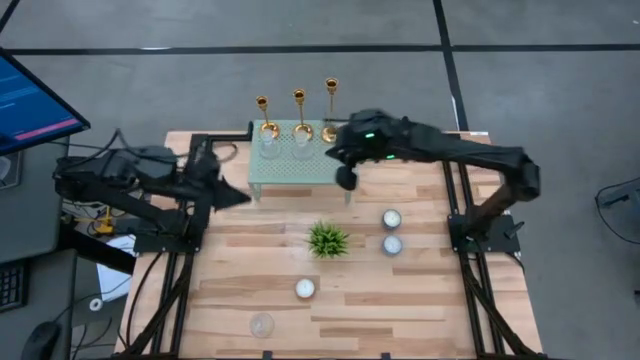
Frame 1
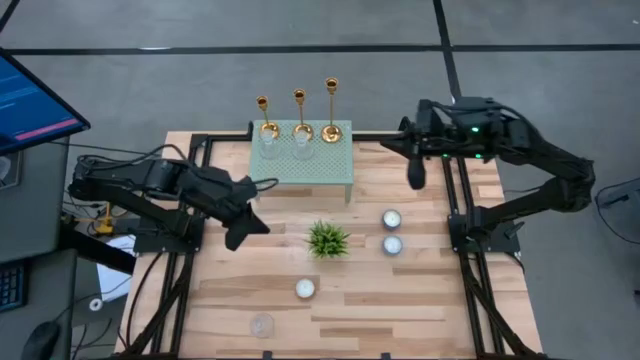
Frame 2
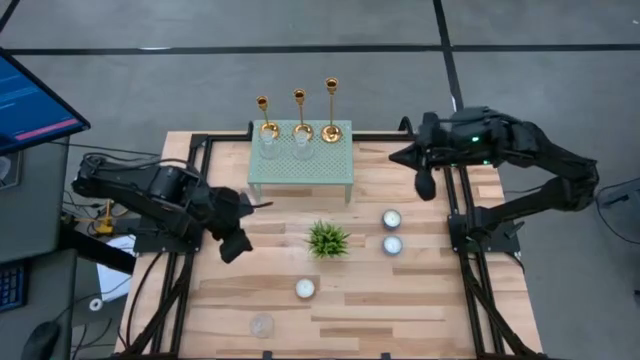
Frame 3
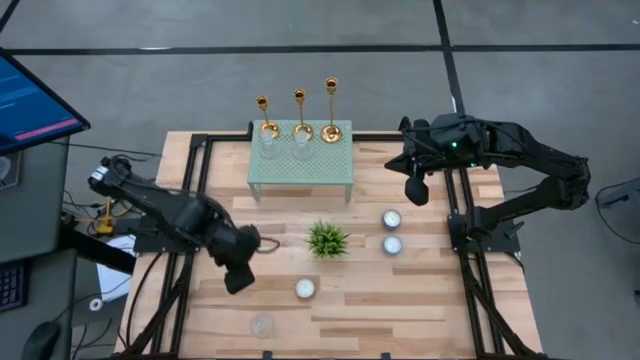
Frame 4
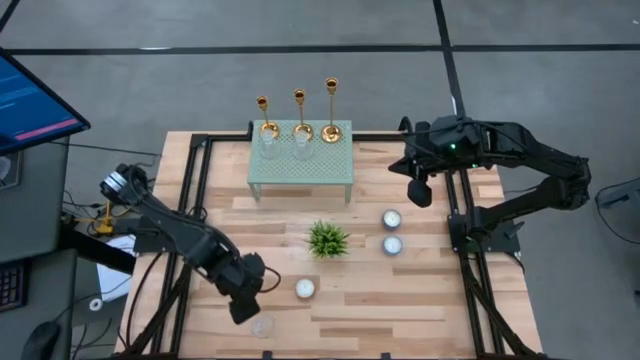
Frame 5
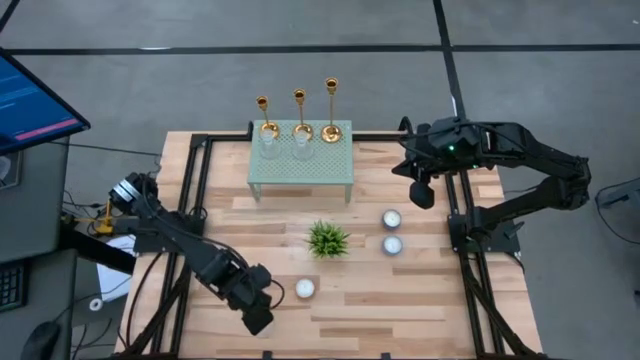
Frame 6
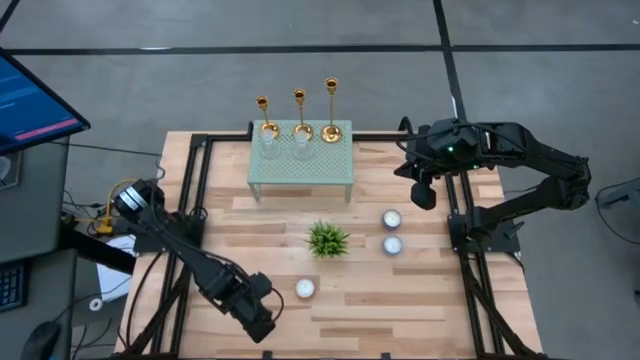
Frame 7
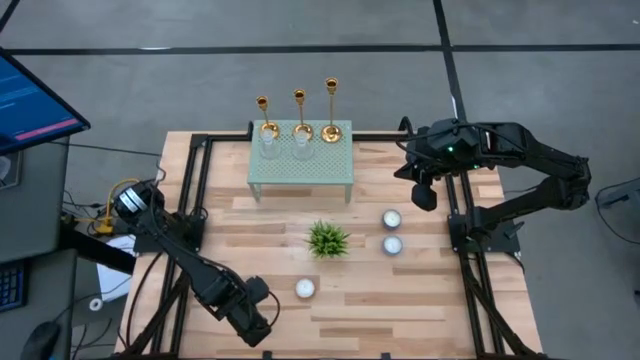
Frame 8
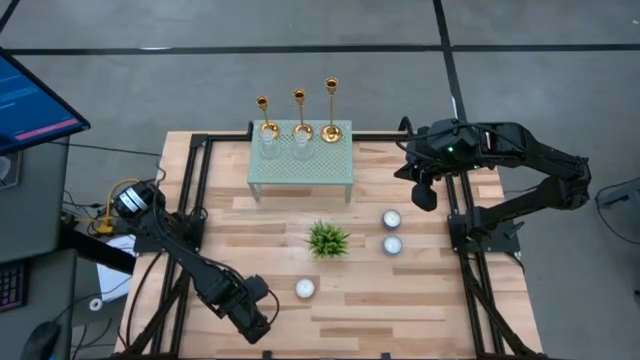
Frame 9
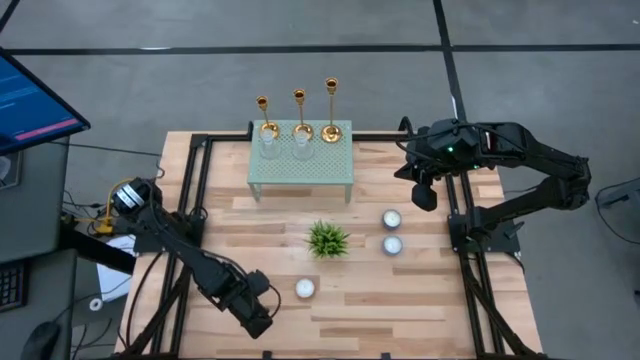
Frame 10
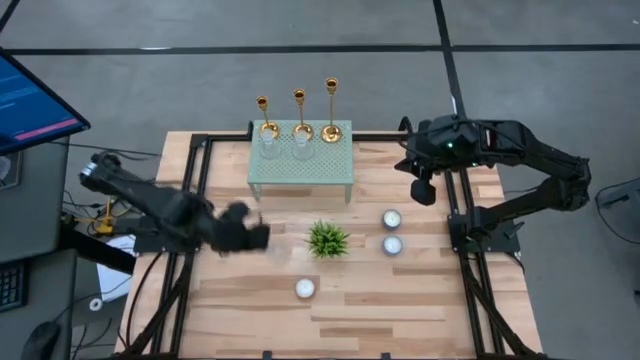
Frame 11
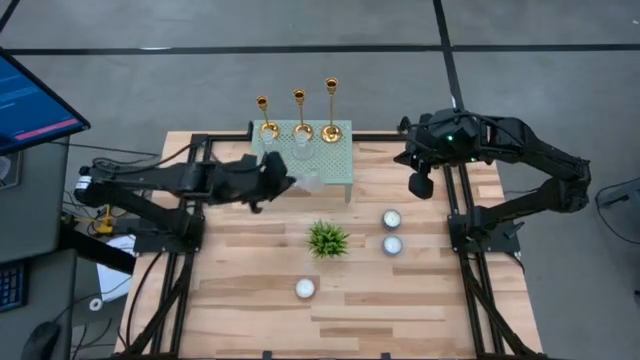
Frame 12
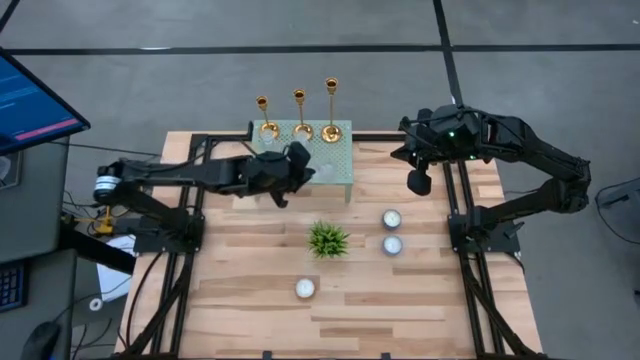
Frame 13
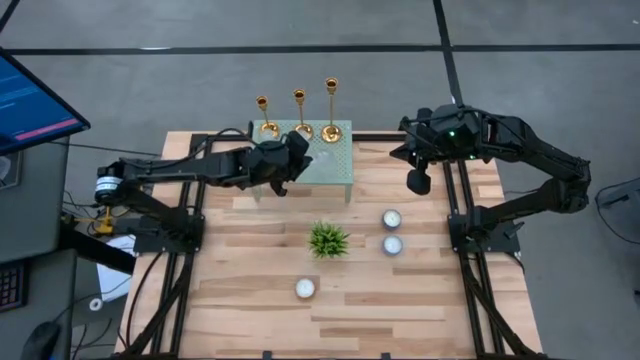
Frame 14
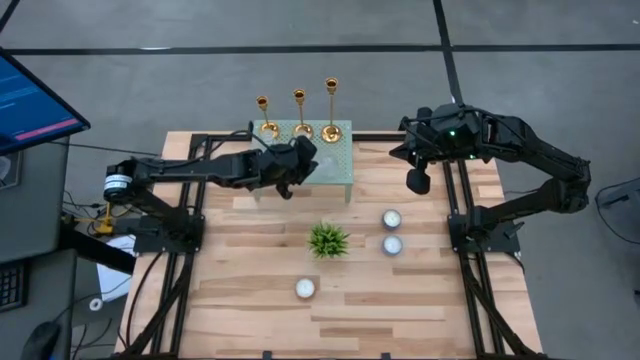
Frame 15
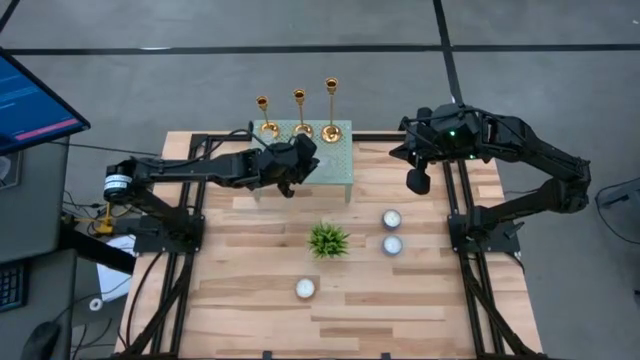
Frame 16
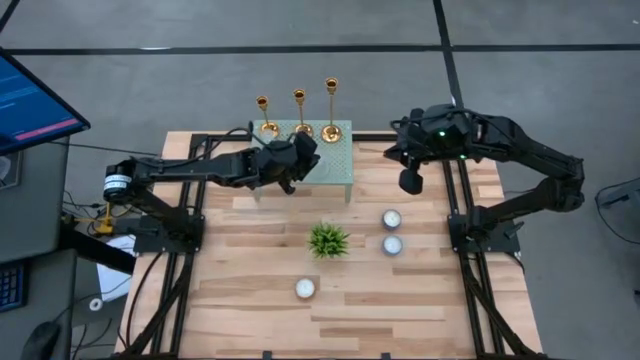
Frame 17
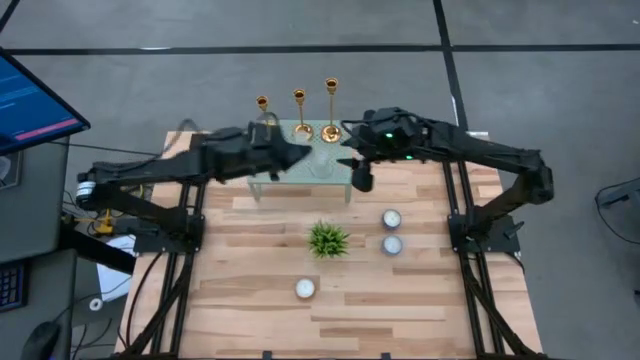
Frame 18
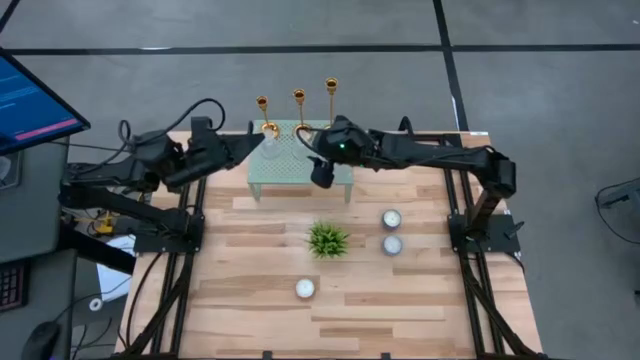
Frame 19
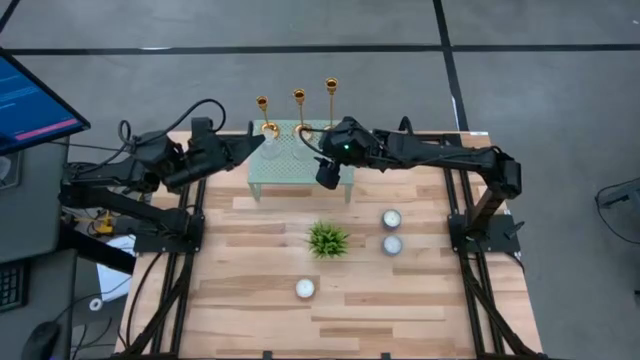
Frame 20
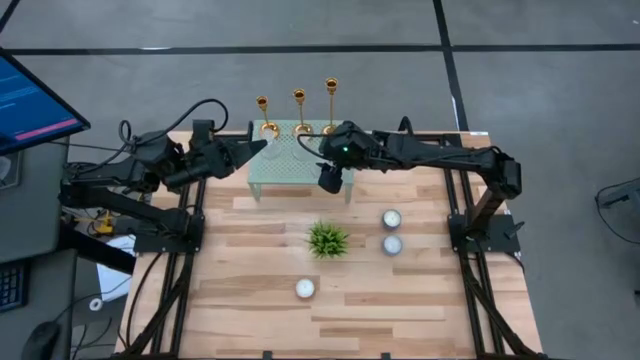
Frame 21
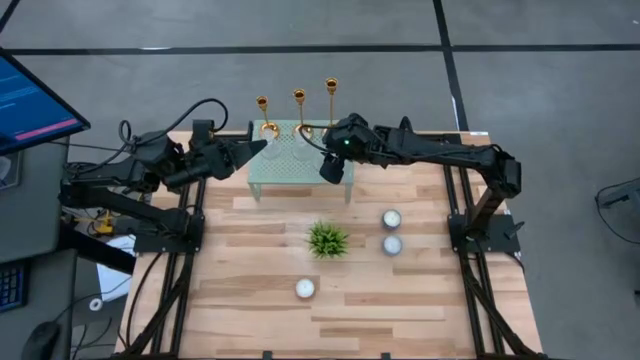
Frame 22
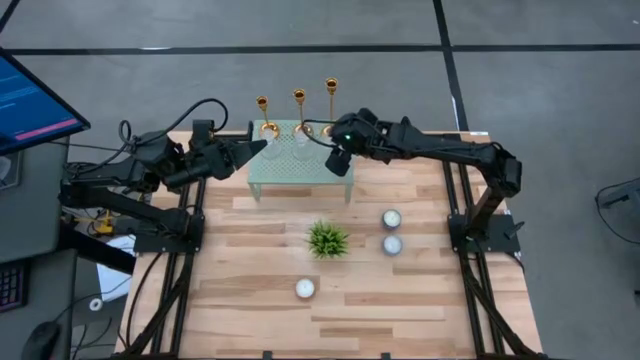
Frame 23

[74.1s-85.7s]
Task: Pick & Place candle stick holders
Put the glass candle holder on the shelf aligned with the other glass candle holders

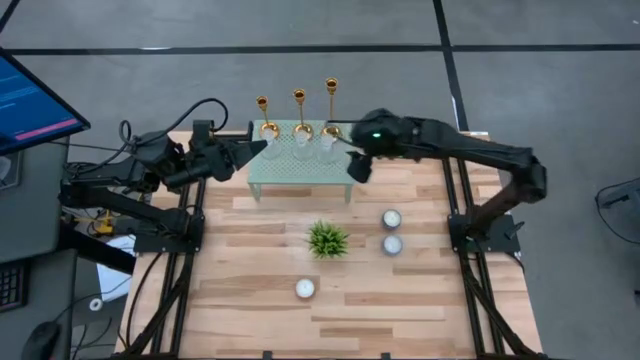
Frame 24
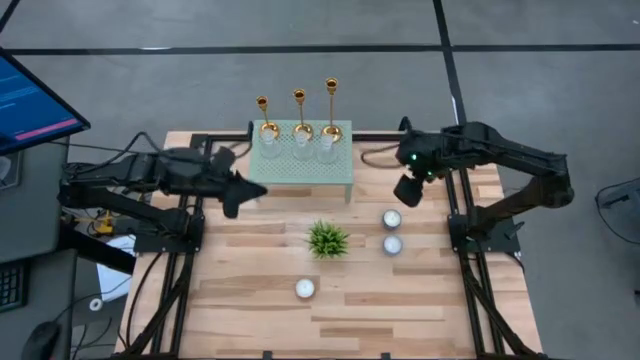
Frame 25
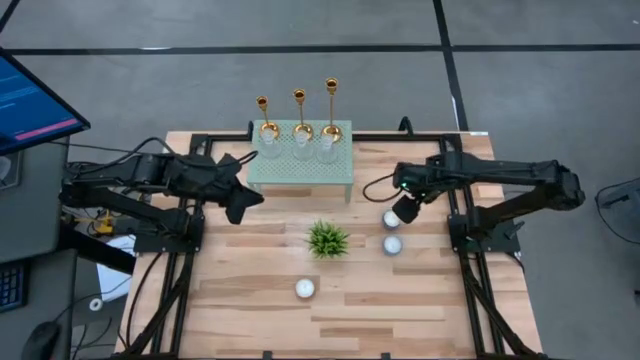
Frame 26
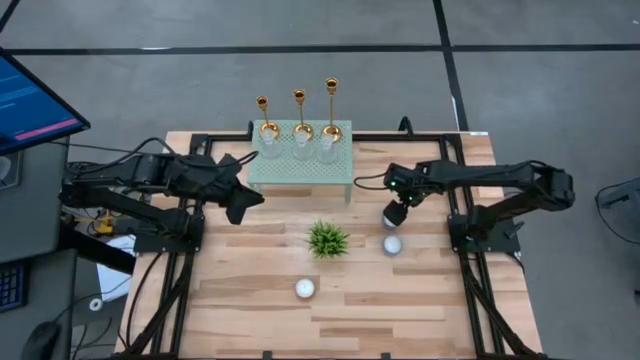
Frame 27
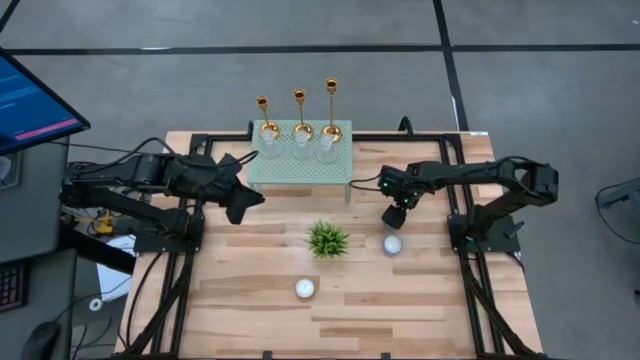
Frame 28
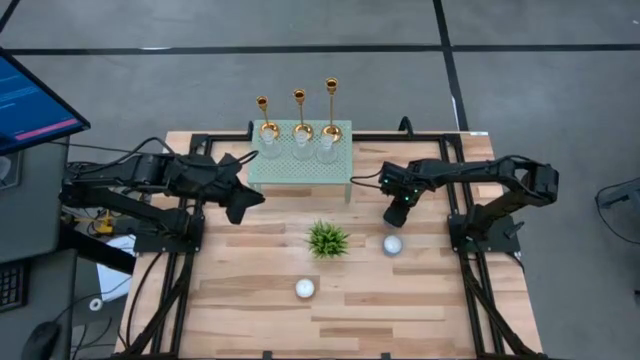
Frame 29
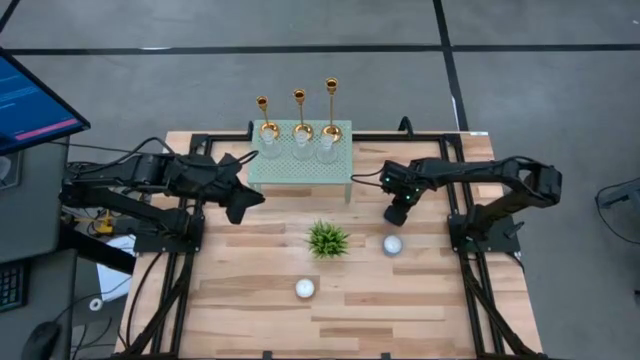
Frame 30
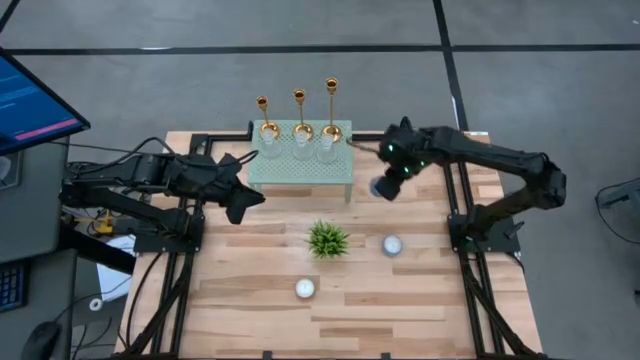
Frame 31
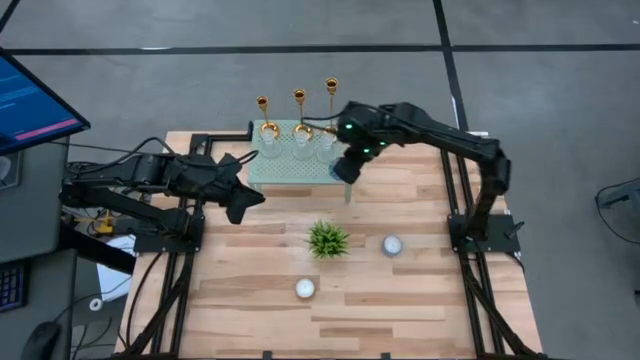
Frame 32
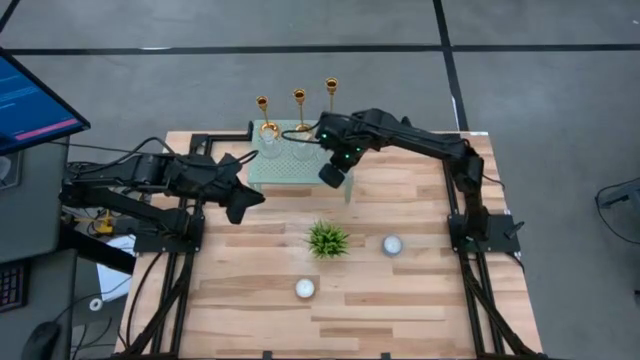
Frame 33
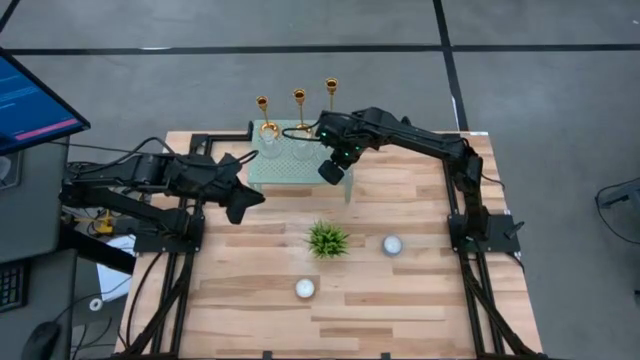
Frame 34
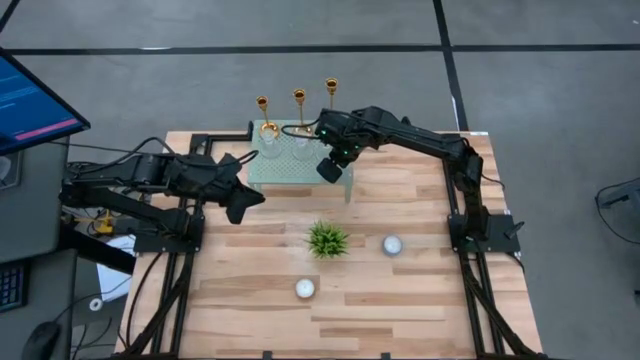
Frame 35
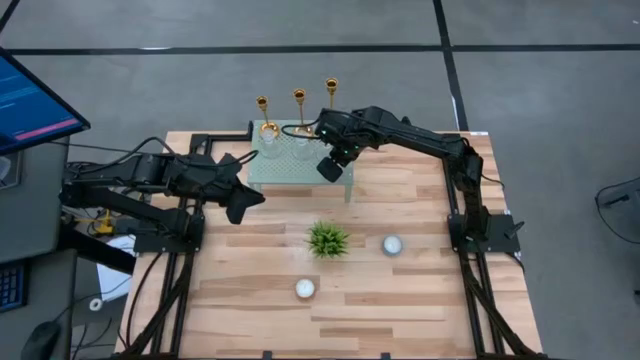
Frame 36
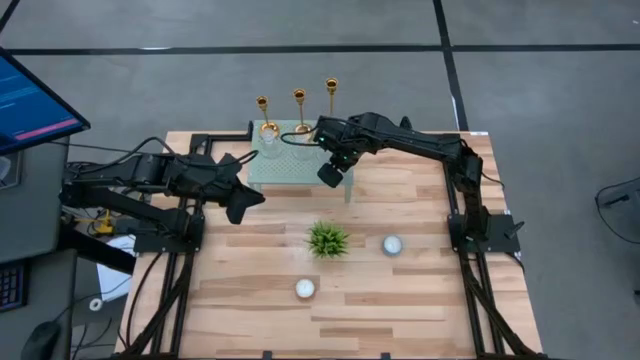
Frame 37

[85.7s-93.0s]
Put the blue scented candle on the shelf

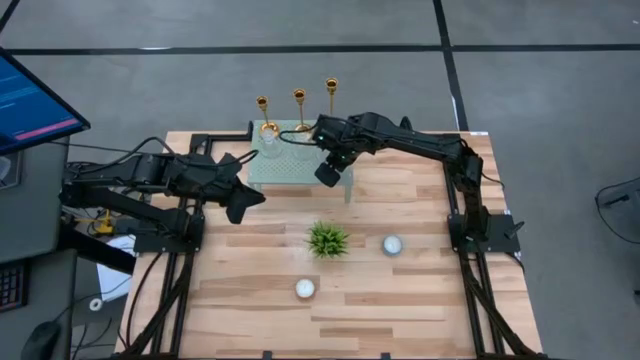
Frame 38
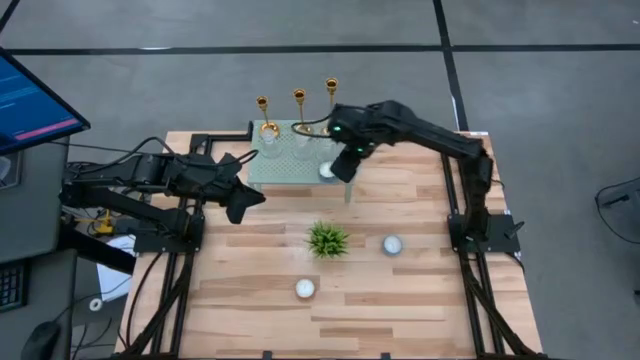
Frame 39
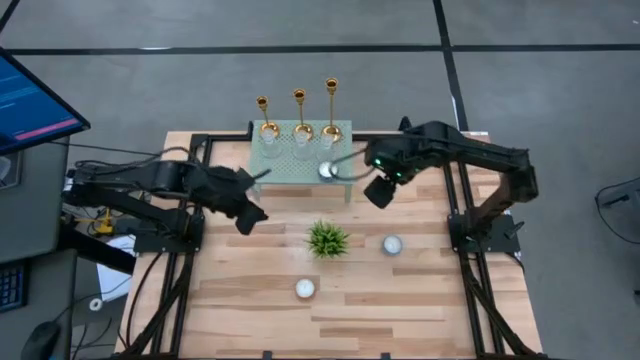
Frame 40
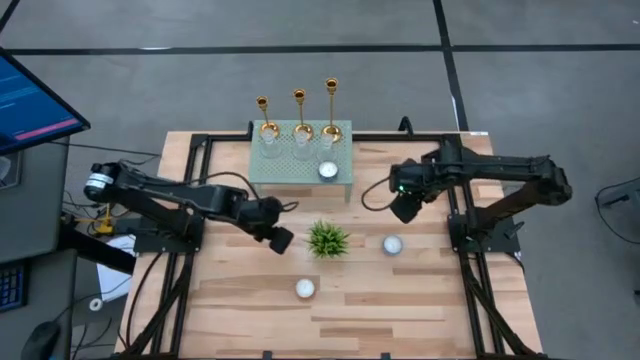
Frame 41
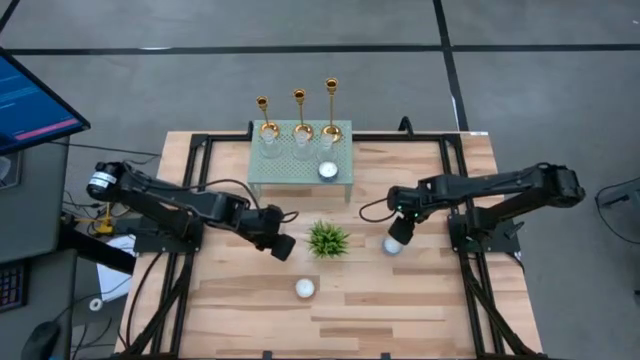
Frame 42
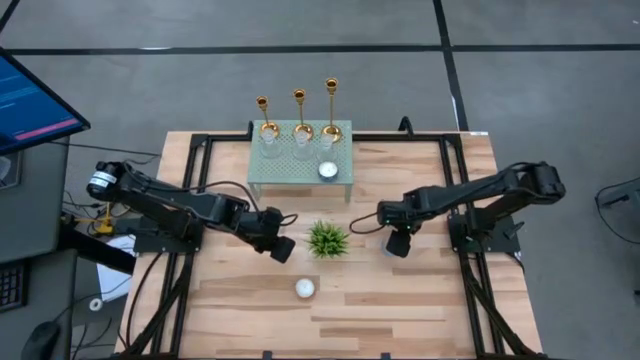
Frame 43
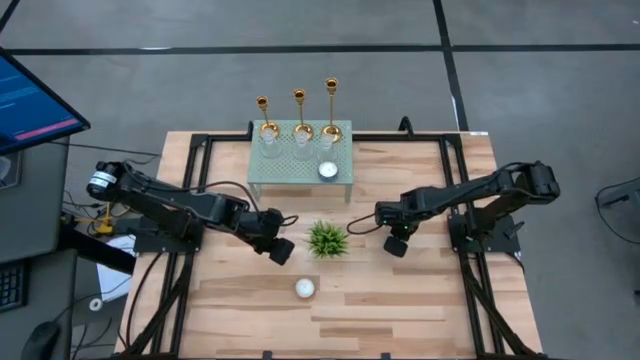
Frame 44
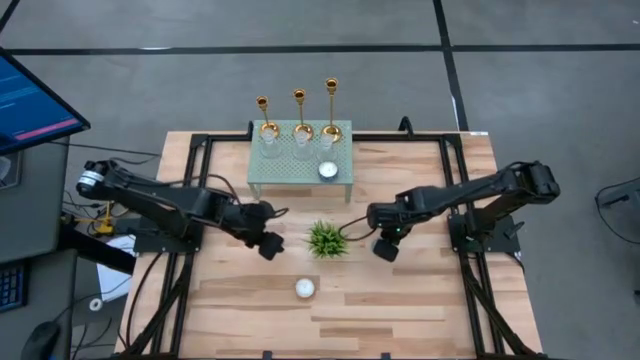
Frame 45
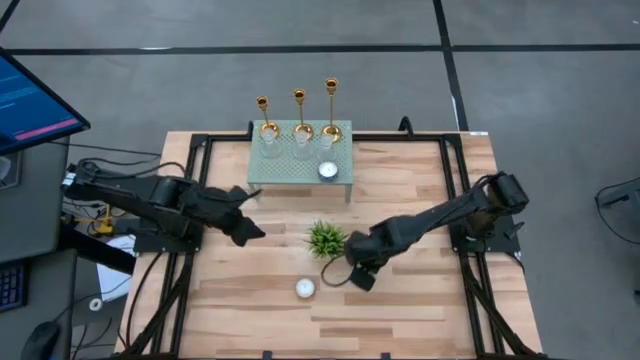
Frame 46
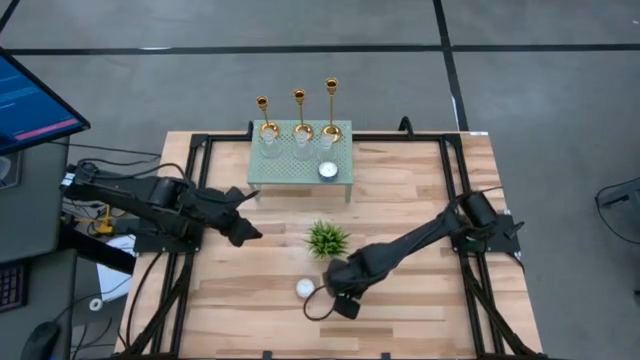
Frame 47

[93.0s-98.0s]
Move the light blue scented candle to the bottom of the table
